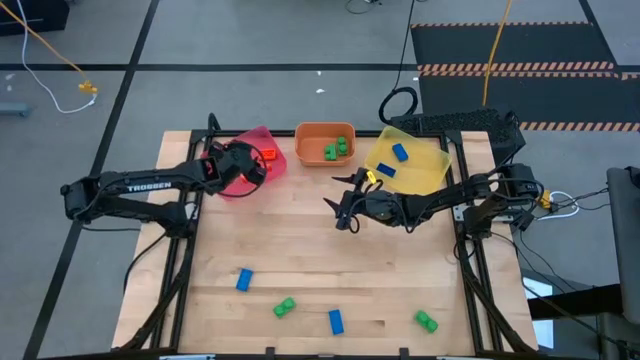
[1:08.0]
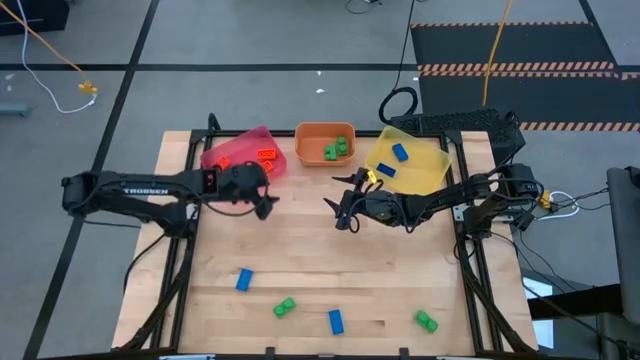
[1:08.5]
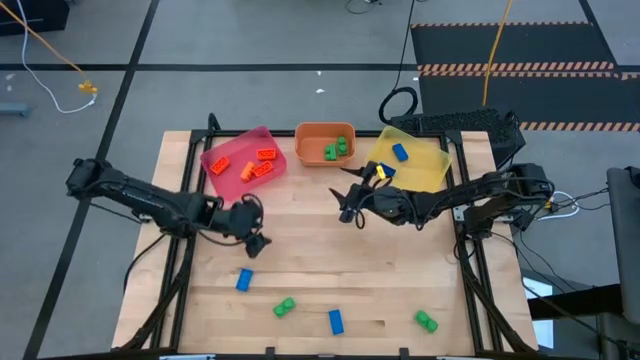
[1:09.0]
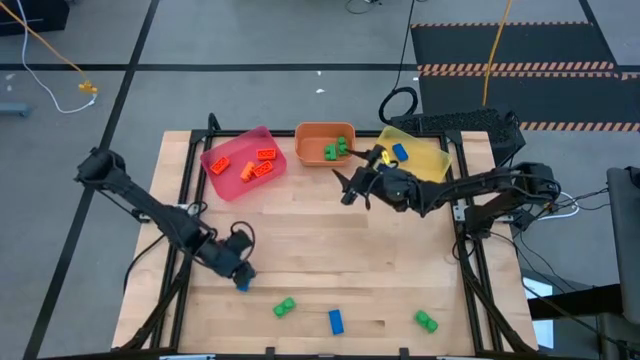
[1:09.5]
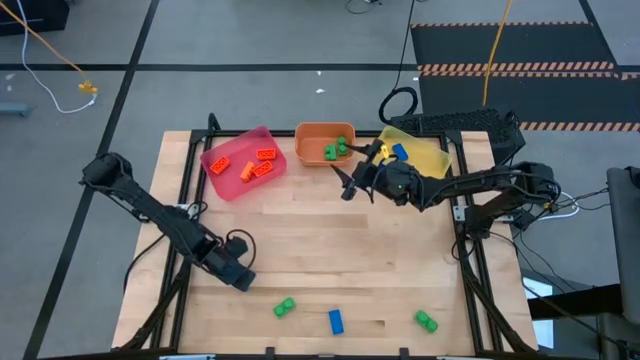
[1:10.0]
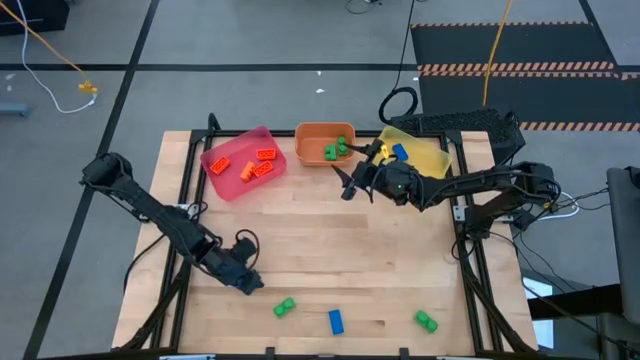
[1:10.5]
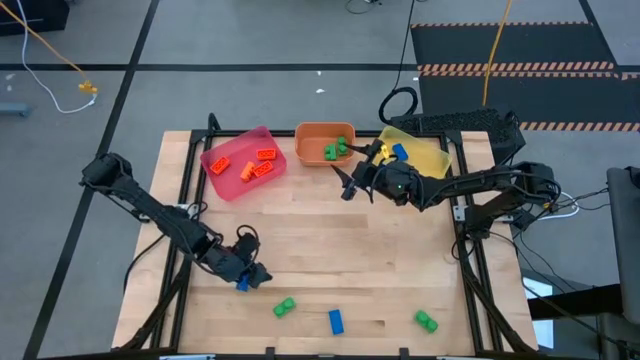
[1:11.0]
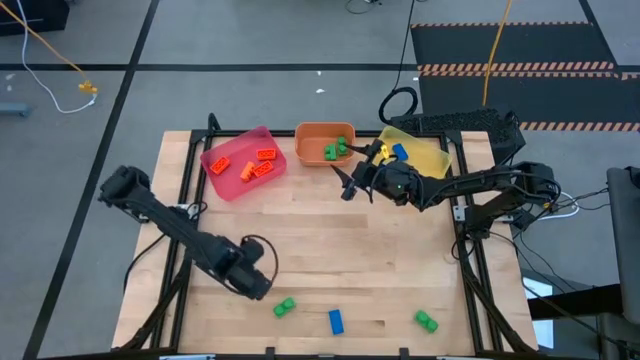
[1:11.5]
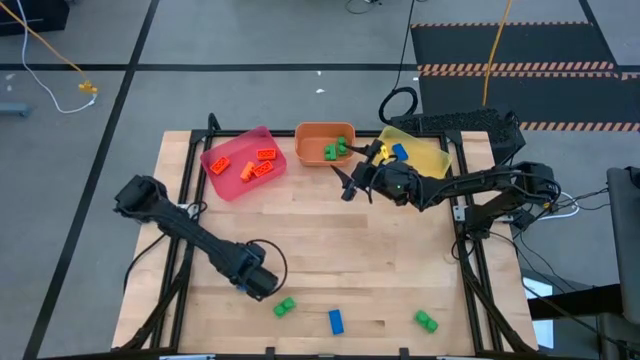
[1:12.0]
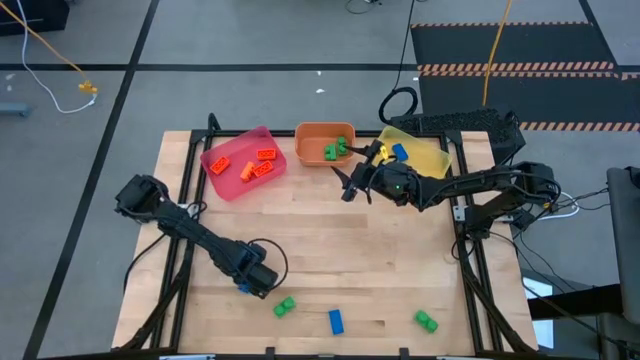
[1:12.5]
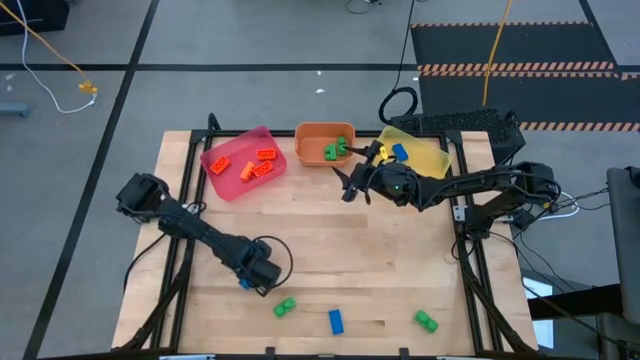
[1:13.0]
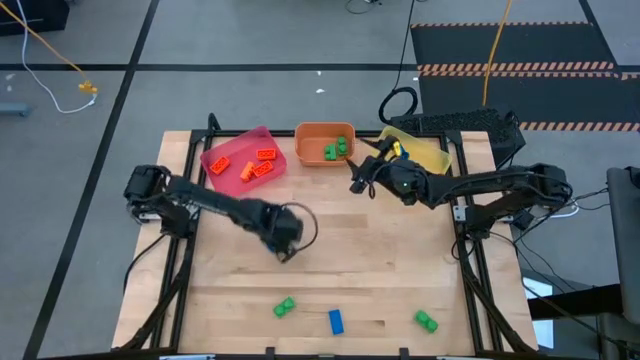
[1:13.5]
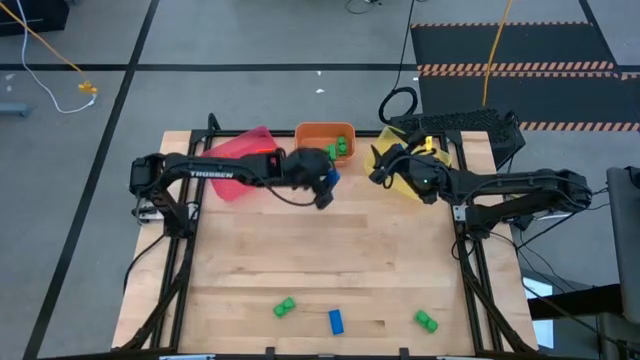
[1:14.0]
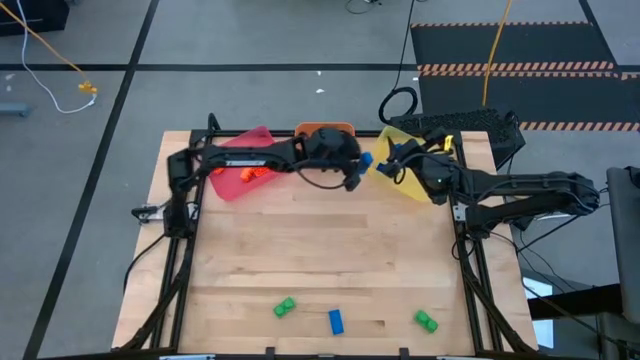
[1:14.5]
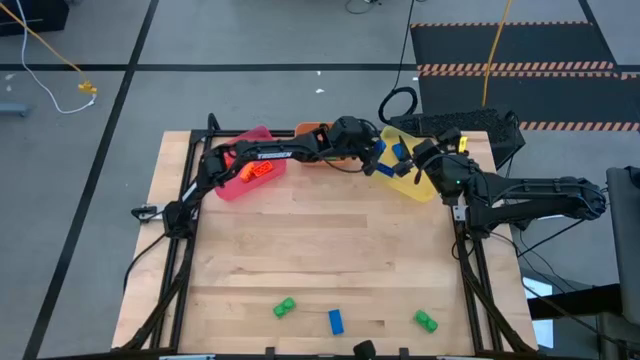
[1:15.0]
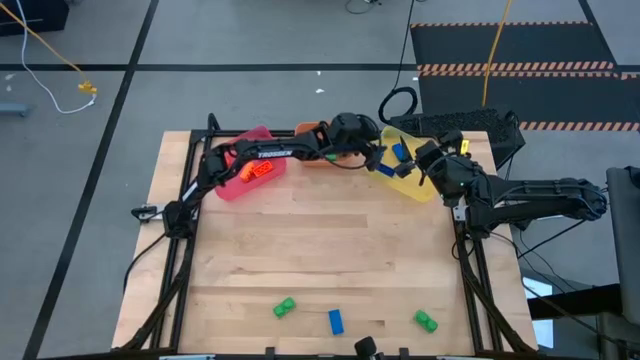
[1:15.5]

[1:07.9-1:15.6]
Task: Sort & place blocks by color
Put the blue game piece into the yellow bin

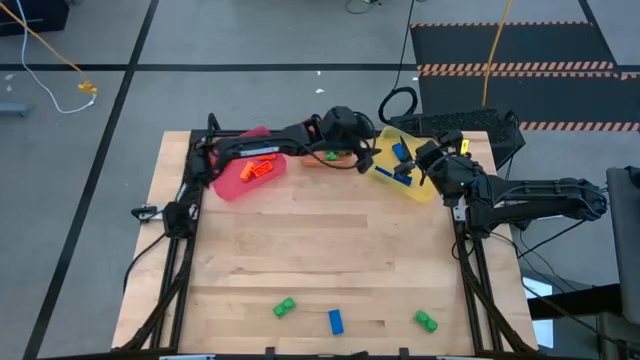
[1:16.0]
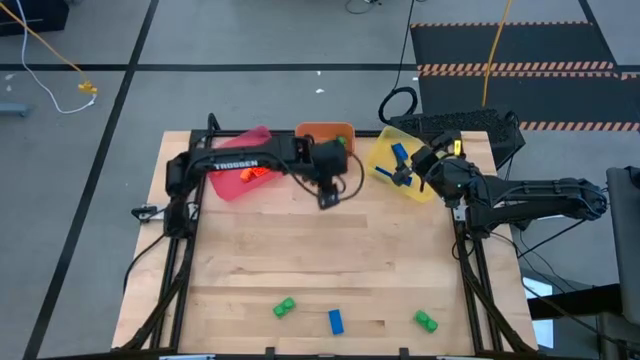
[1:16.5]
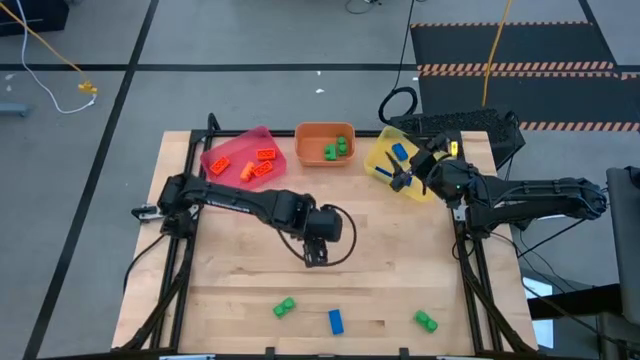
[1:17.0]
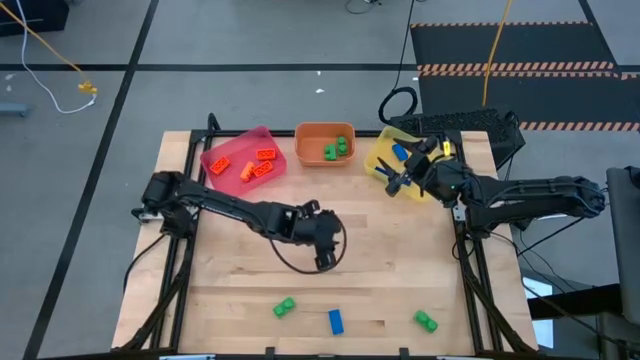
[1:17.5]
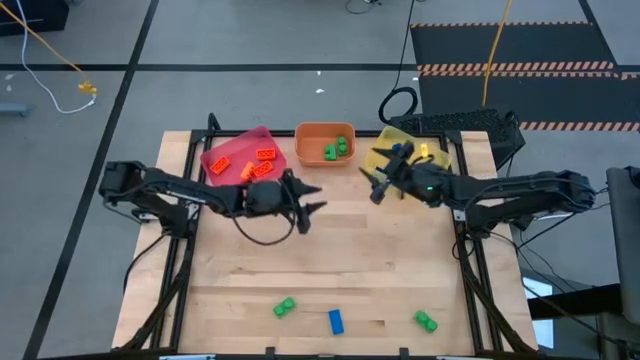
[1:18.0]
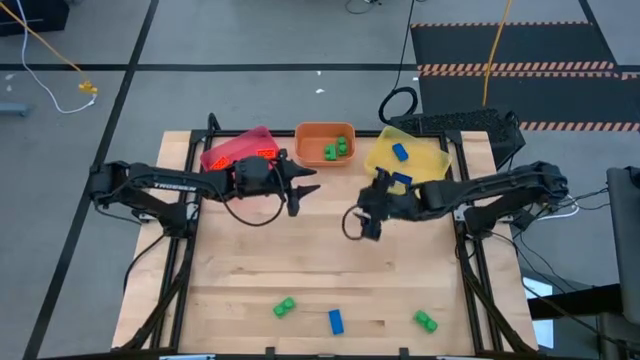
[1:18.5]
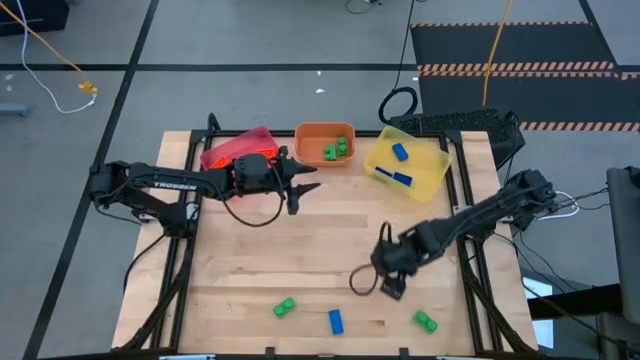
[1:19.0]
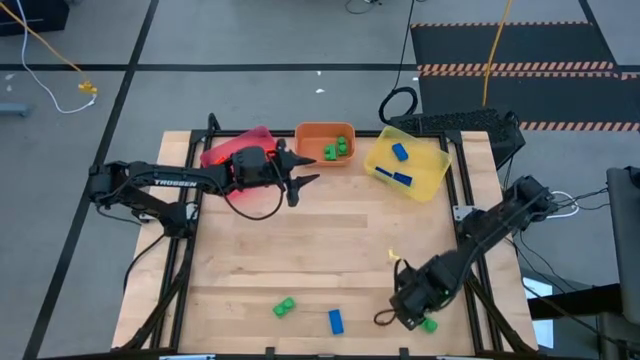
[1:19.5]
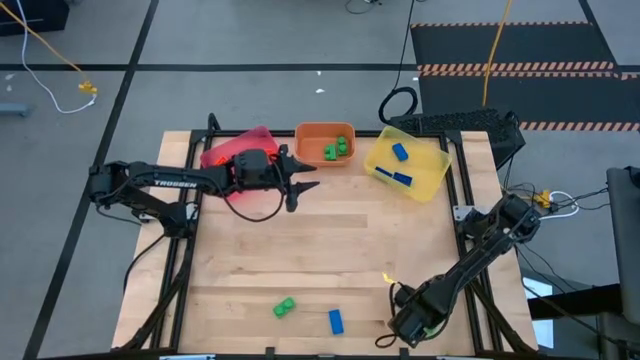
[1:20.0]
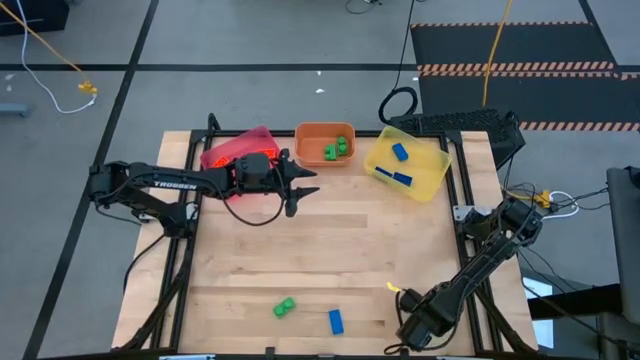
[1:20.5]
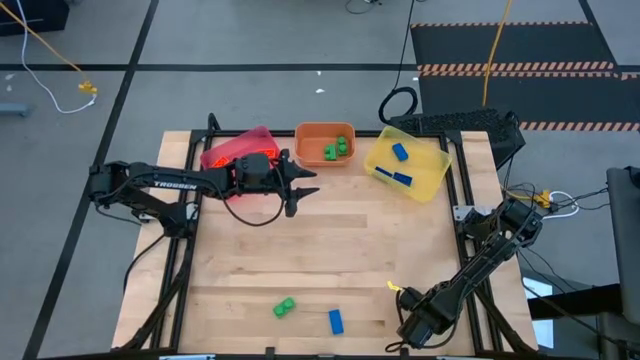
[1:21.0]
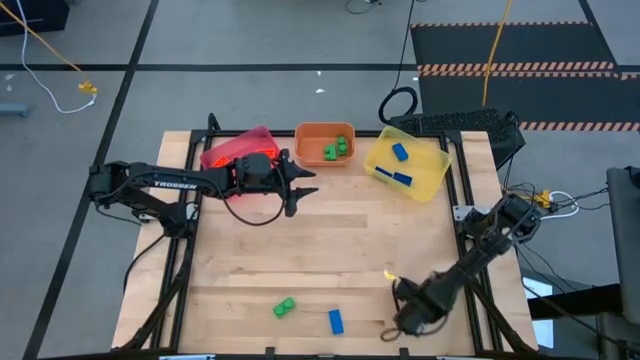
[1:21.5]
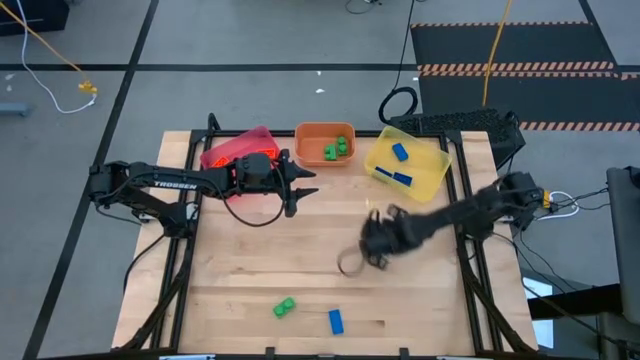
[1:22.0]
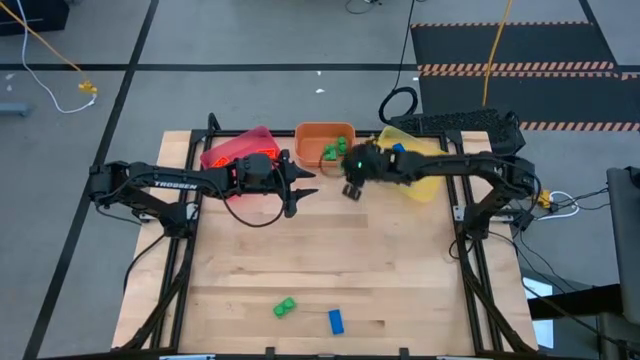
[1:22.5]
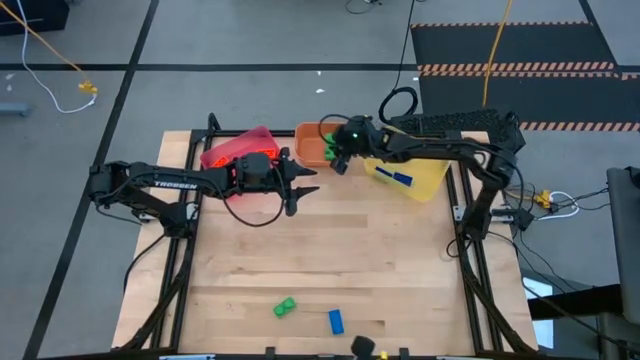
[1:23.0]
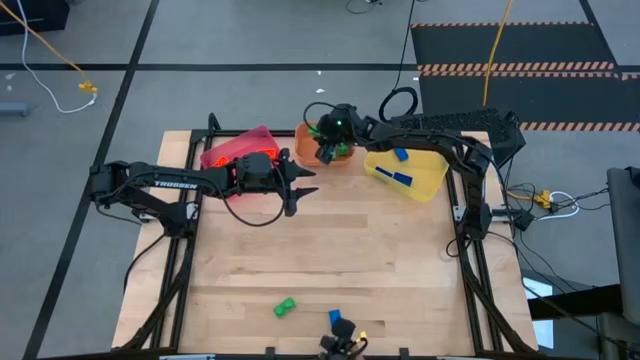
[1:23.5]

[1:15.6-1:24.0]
Put the green game piece into the orange bin

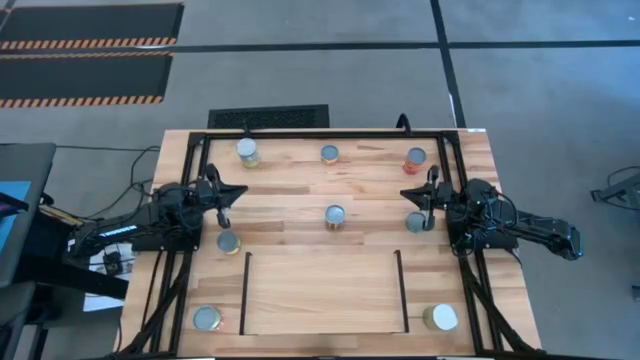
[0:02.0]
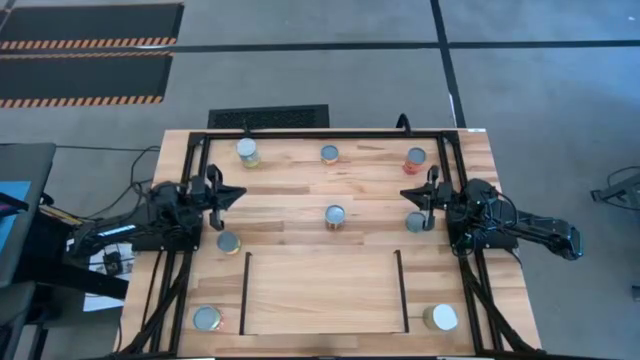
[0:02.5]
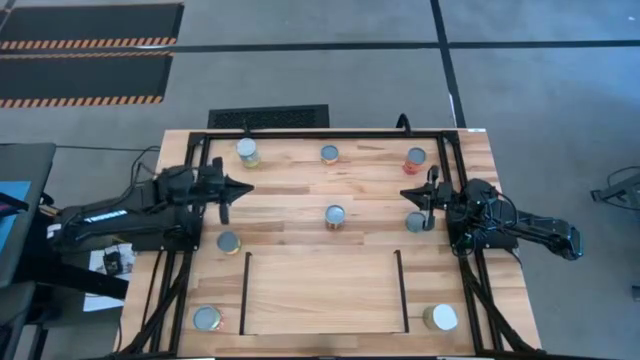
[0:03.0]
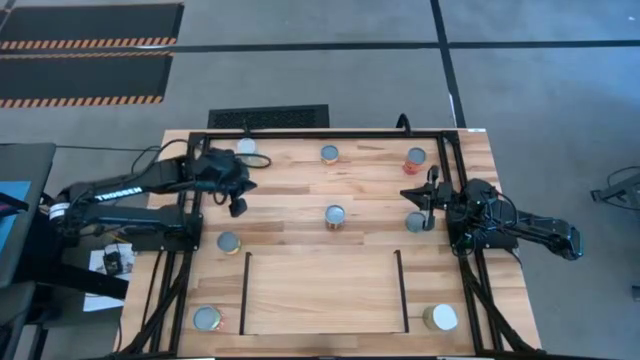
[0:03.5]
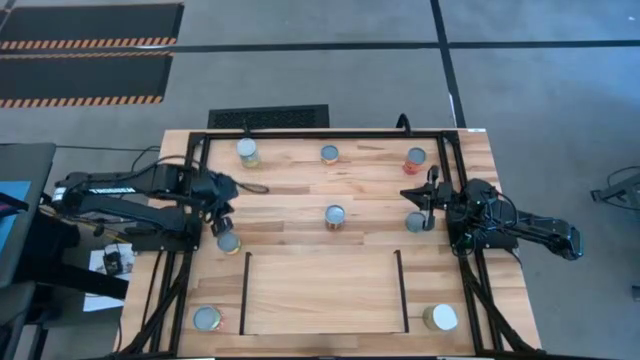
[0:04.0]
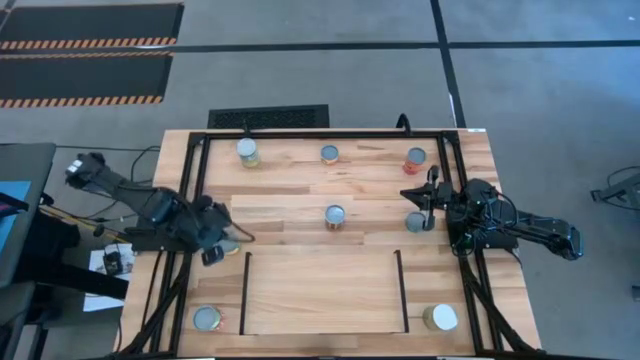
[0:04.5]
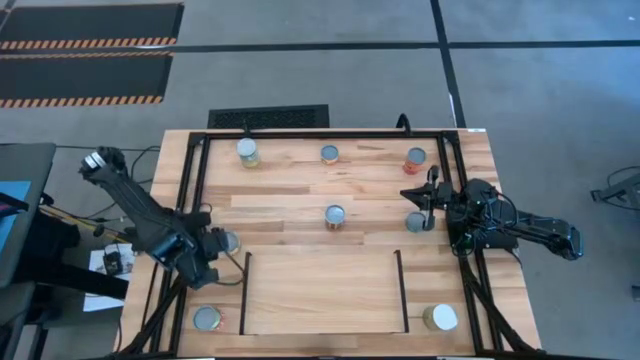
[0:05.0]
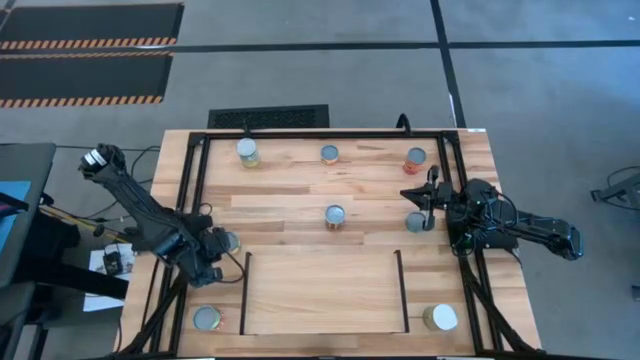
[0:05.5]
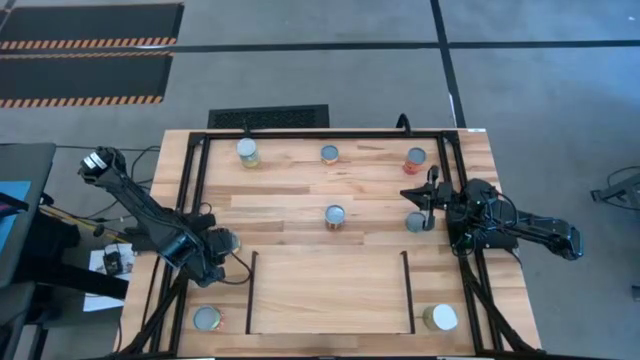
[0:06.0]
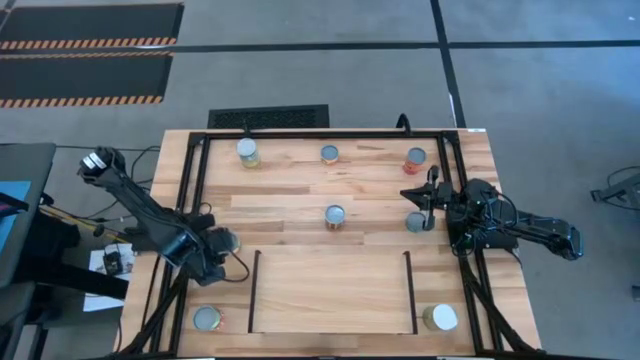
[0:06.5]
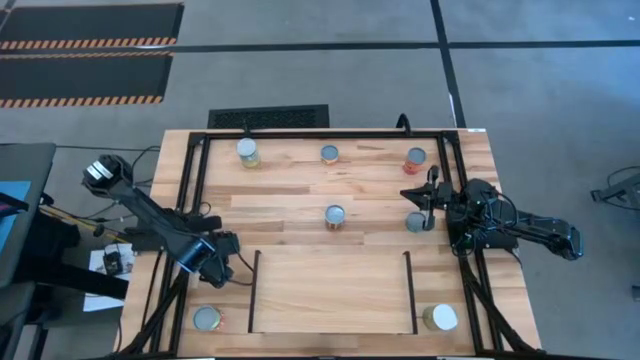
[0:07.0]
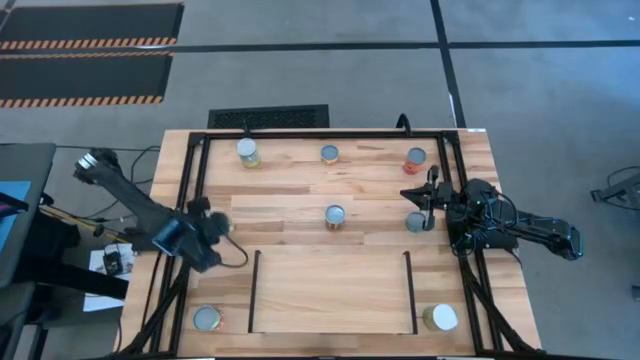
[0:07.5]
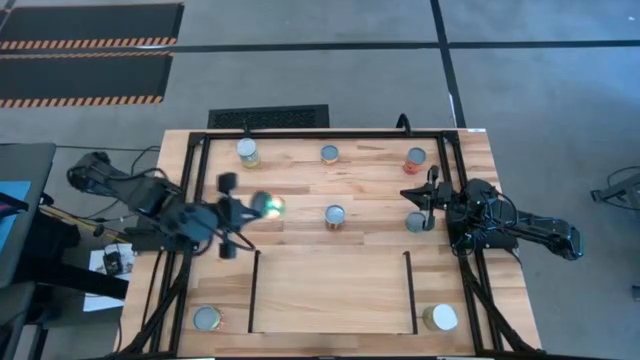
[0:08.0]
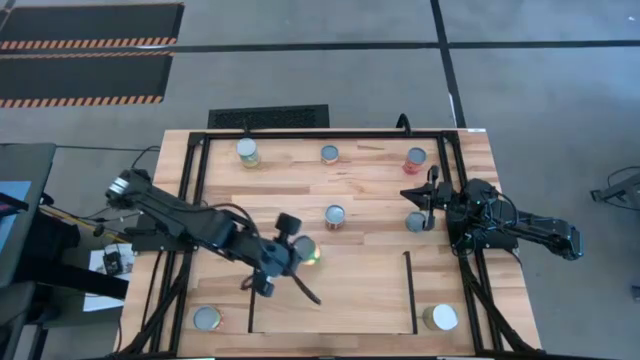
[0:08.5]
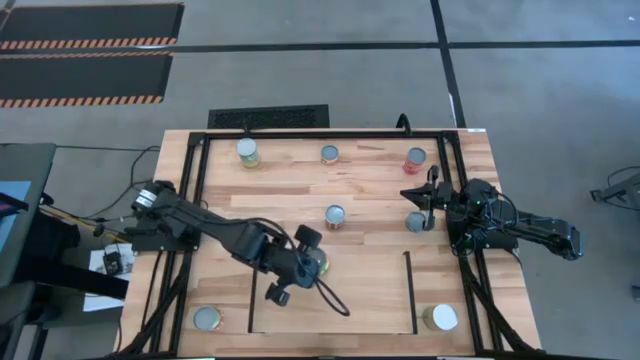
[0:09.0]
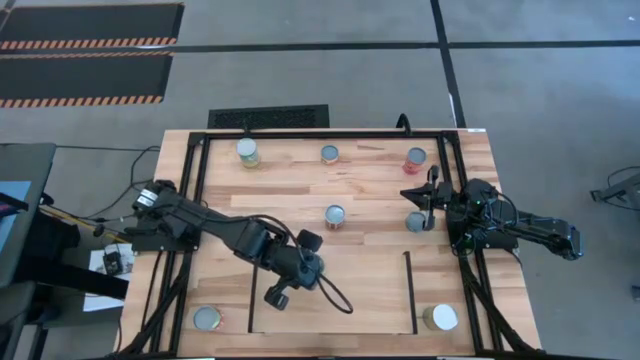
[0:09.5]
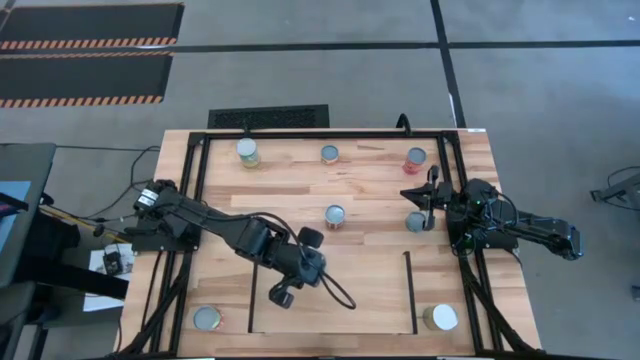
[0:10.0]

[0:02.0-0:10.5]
Task: Pick and place cans onto a shelf
Put the green peach can on the shelf
